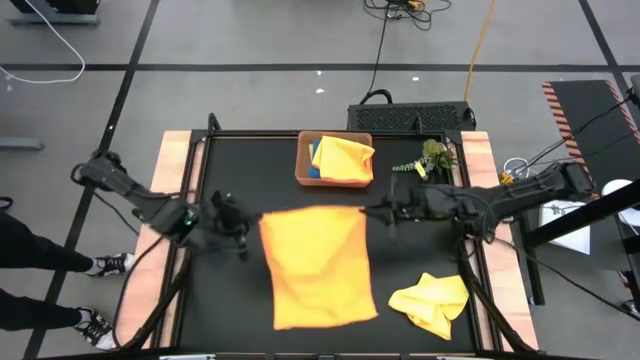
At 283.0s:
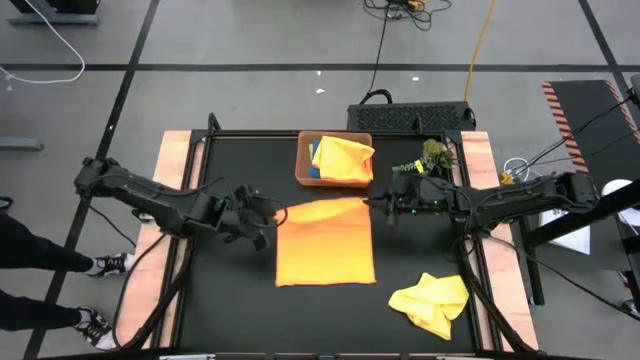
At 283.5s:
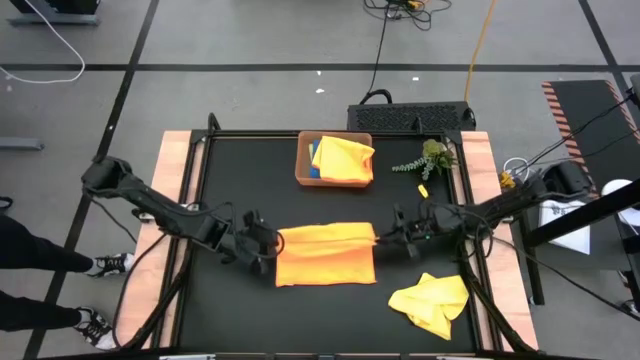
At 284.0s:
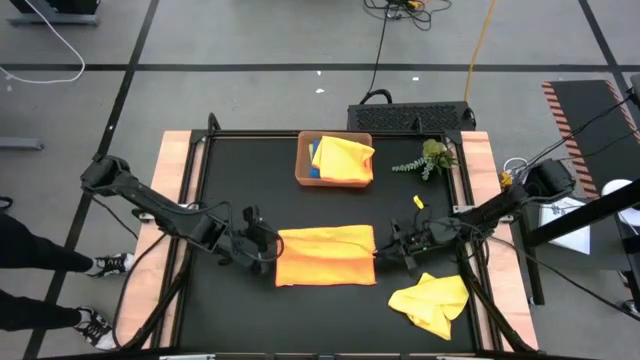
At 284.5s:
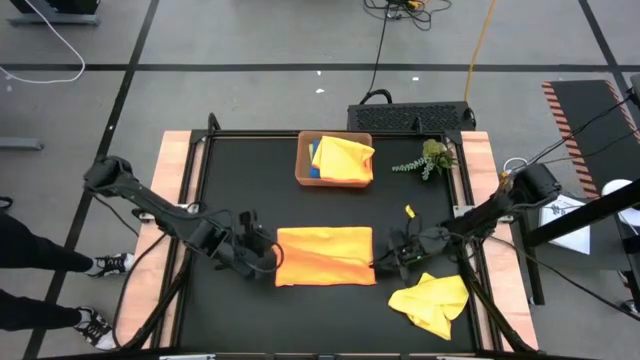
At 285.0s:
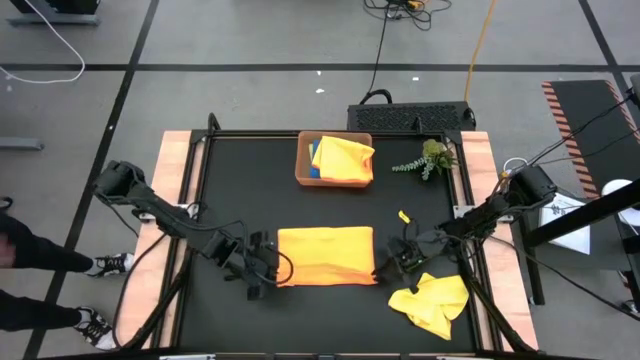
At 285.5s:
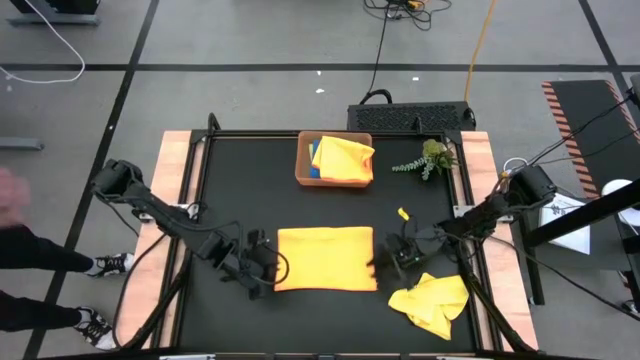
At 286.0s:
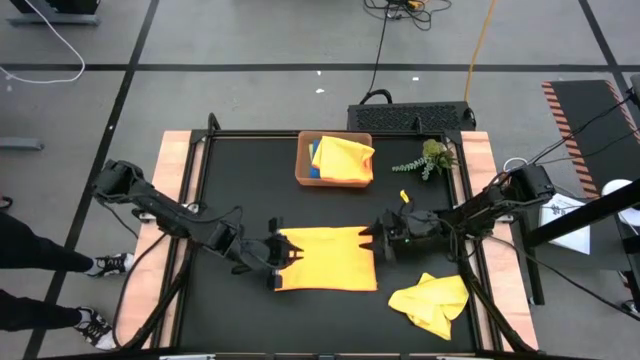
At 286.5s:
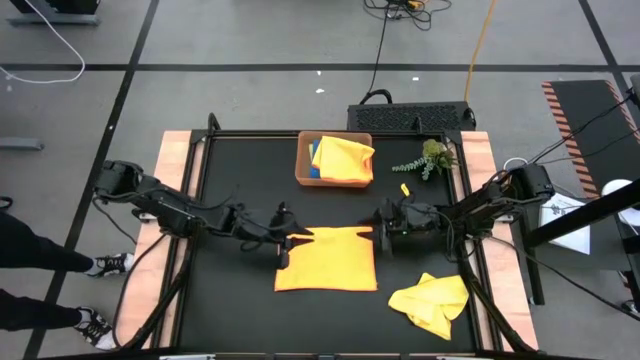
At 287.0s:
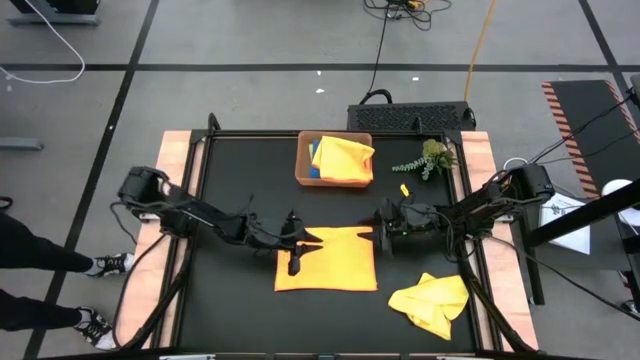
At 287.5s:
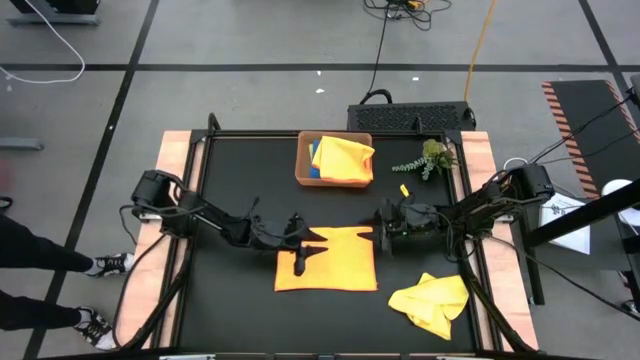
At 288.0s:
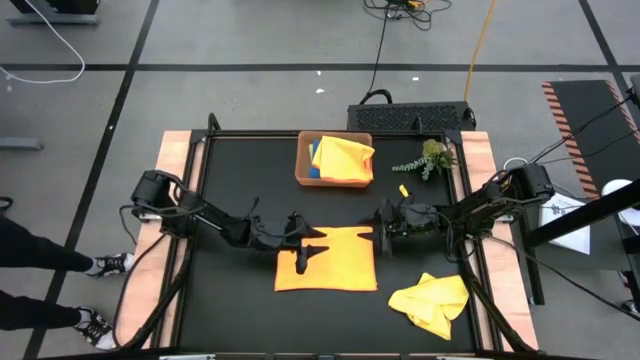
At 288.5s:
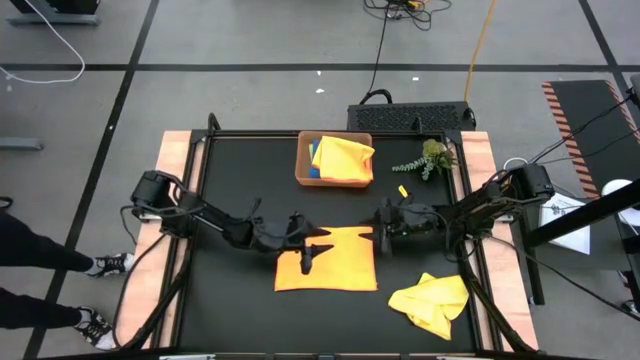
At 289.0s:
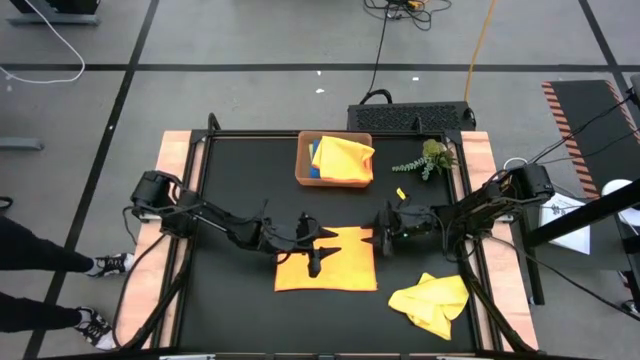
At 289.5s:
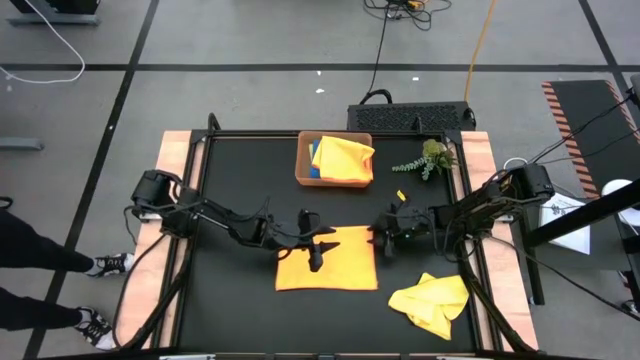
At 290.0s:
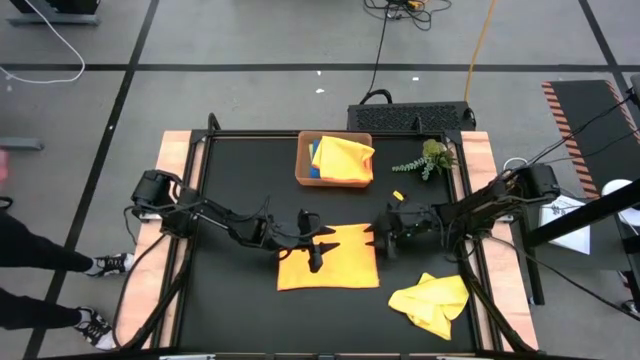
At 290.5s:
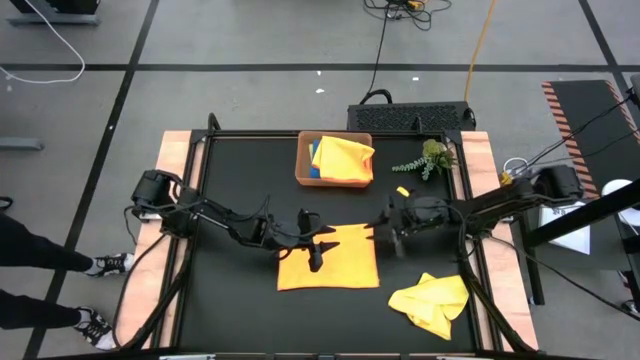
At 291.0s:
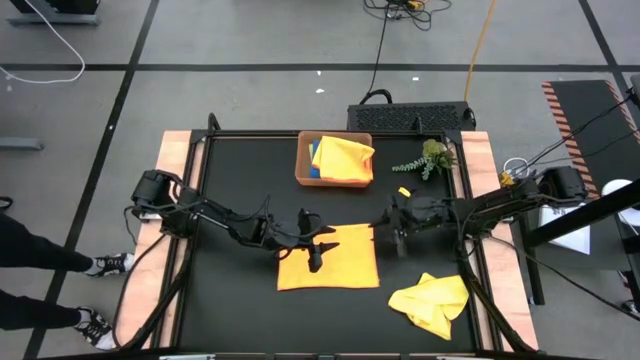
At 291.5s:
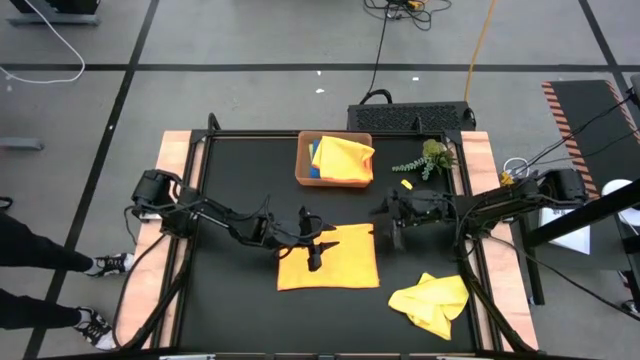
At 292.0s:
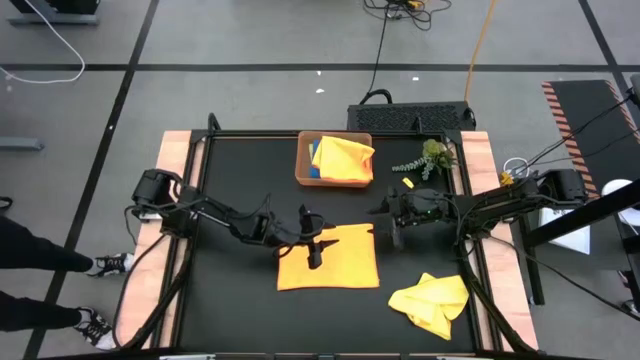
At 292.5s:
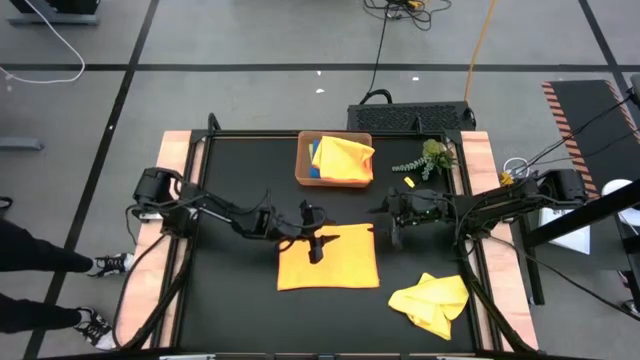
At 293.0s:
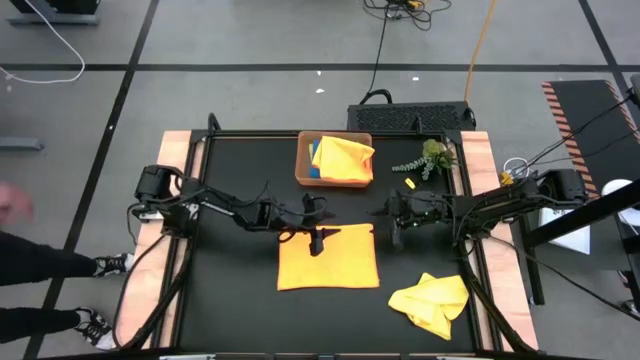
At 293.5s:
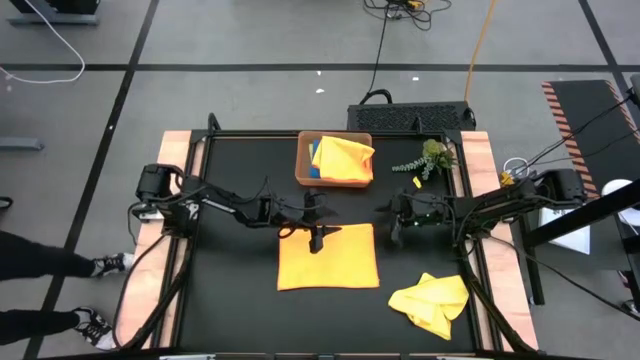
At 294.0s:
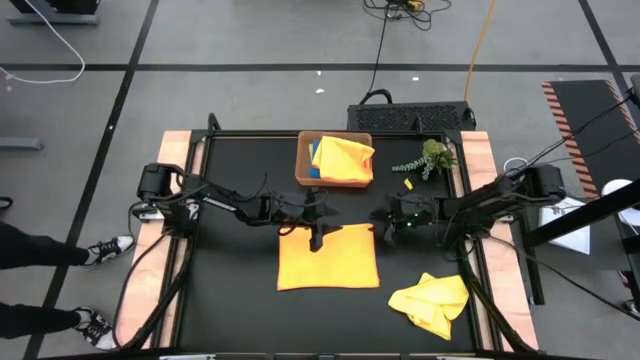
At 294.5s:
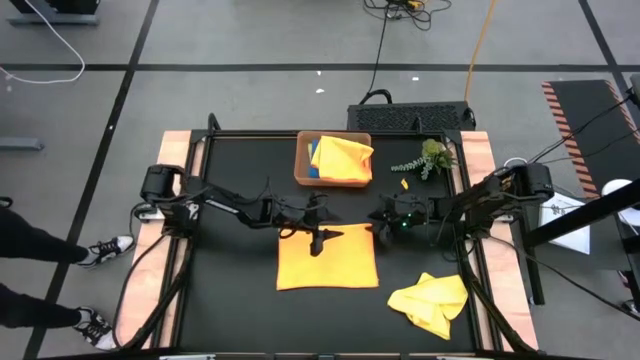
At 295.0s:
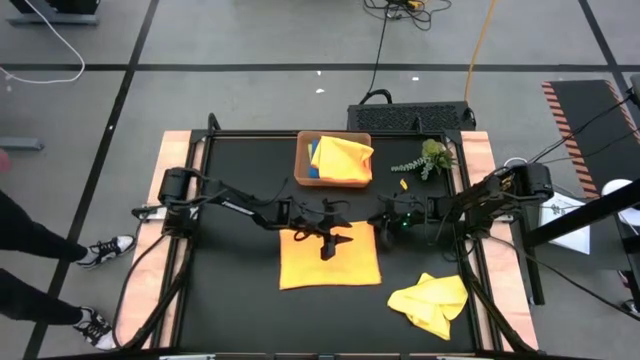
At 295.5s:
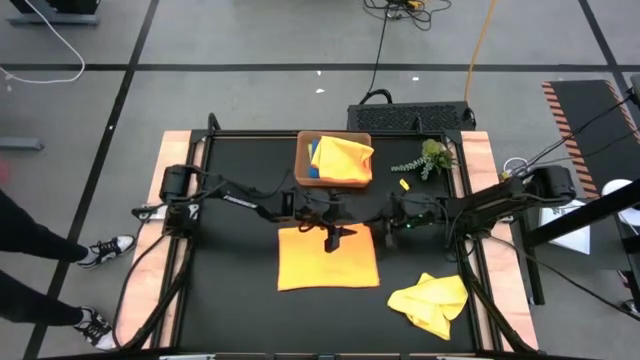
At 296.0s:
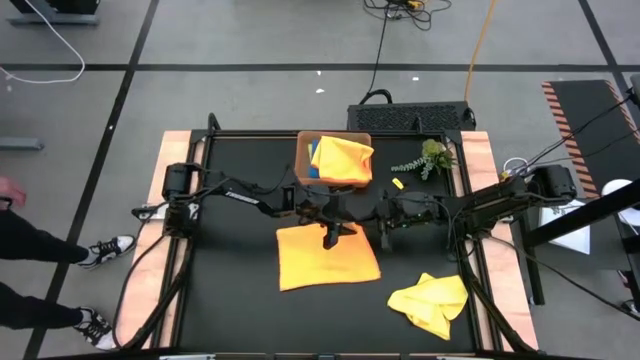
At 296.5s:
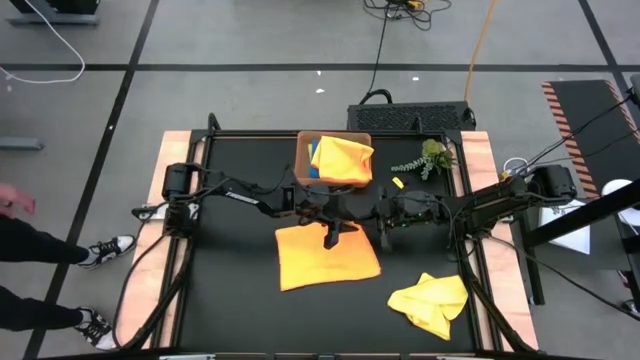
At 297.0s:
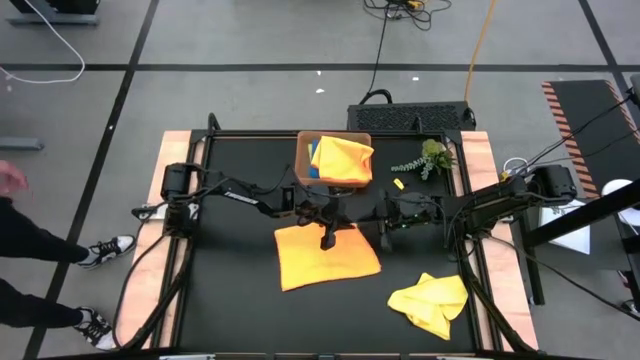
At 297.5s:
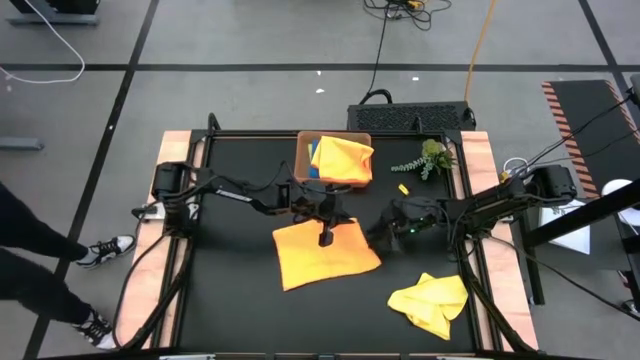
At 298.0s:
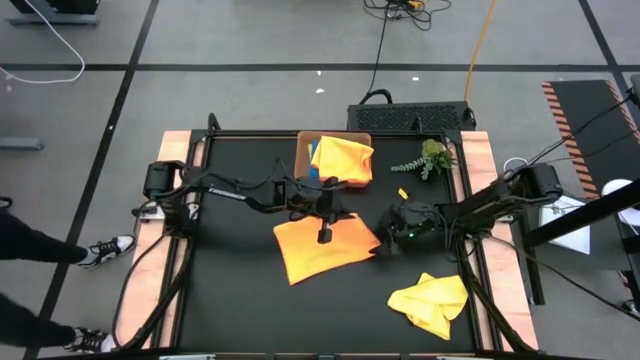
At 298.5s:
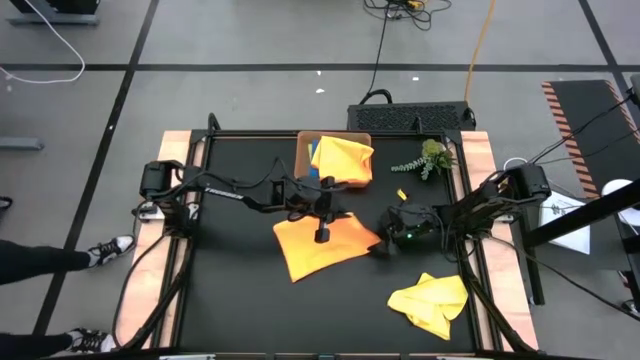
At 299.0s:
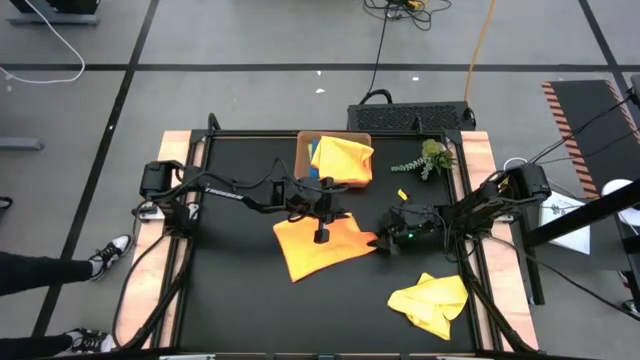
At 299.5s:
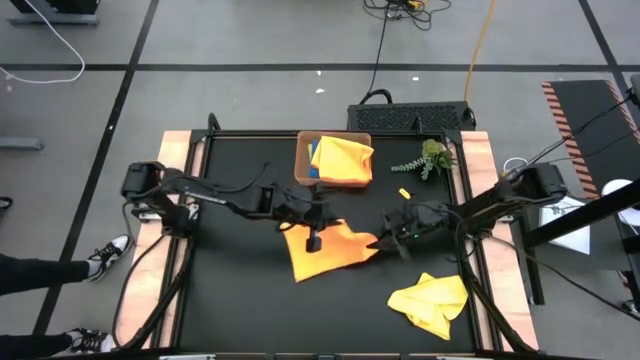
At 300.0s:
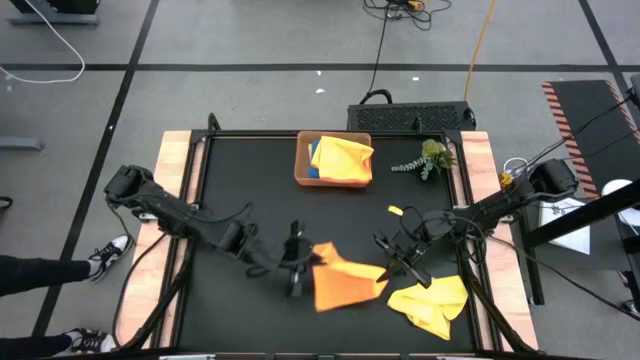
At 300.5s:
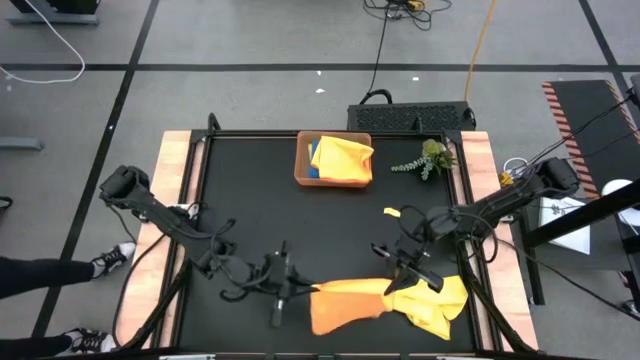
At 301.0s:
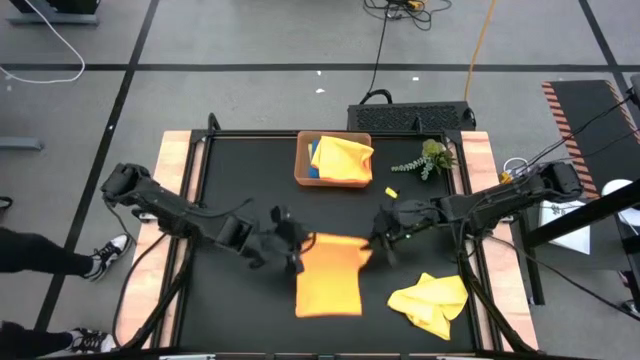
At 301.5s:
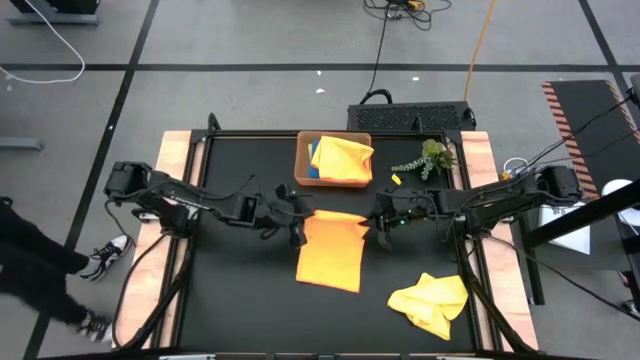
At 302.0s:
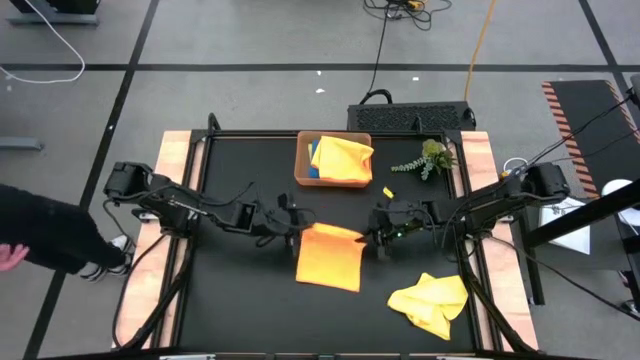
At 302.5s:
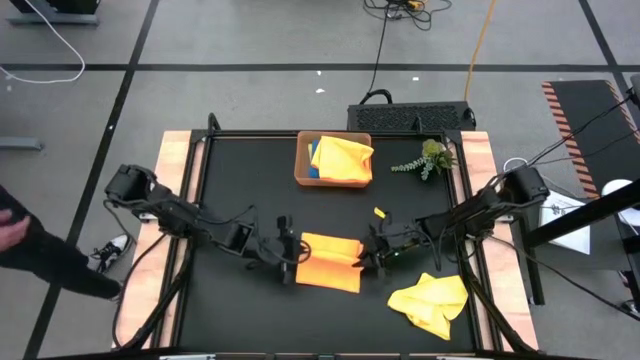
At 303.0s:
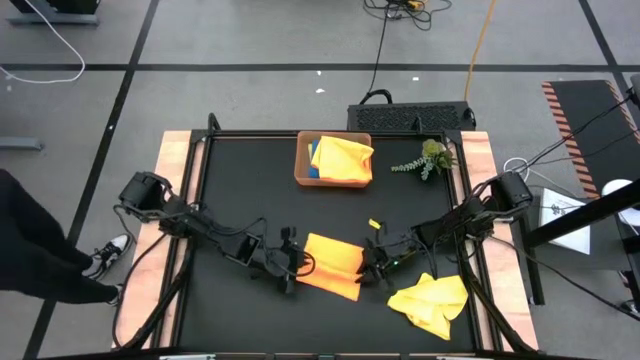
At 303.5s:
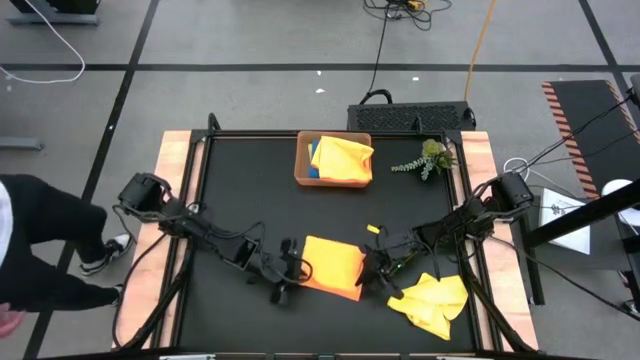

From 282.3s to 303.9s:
Task: Fold microfiber towels
Fold the orange microfiber towel
